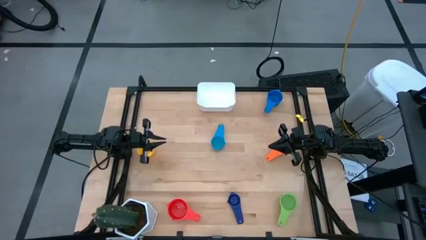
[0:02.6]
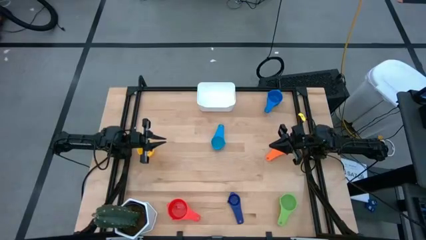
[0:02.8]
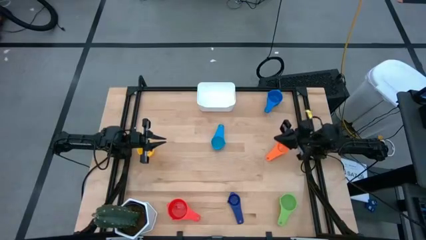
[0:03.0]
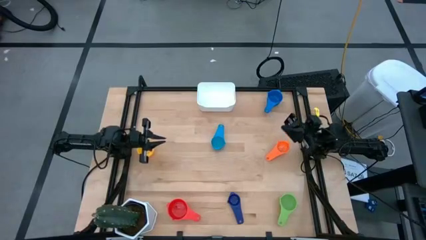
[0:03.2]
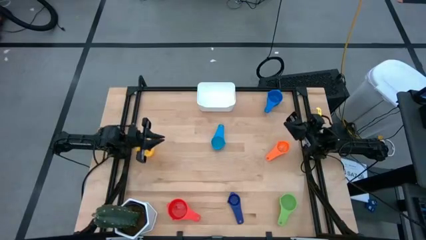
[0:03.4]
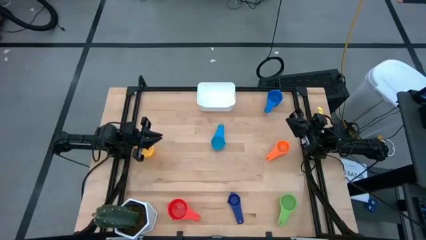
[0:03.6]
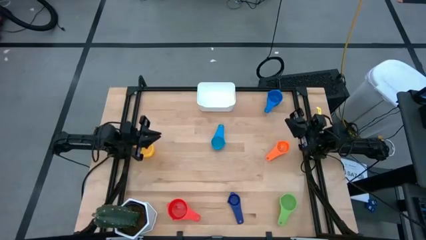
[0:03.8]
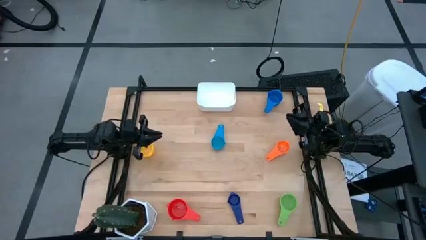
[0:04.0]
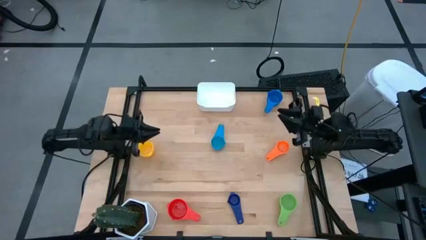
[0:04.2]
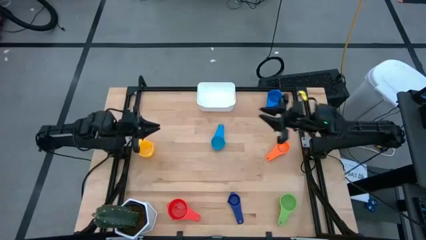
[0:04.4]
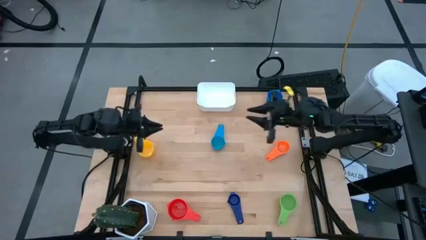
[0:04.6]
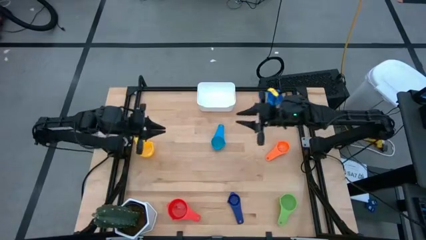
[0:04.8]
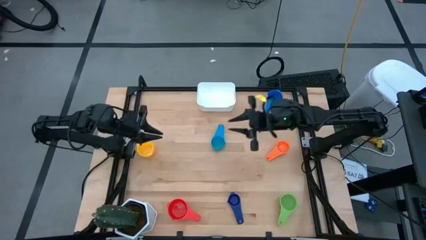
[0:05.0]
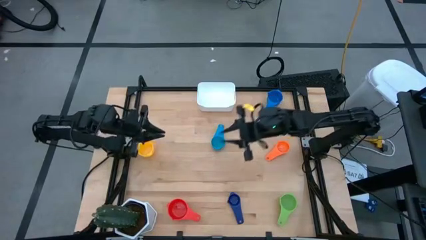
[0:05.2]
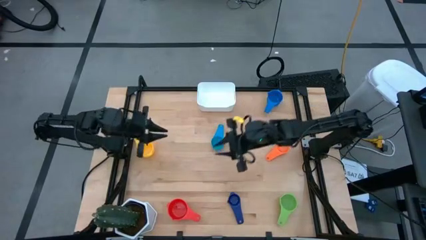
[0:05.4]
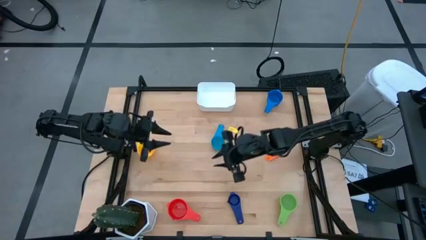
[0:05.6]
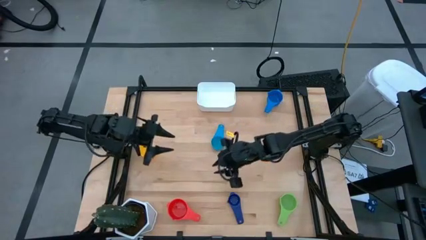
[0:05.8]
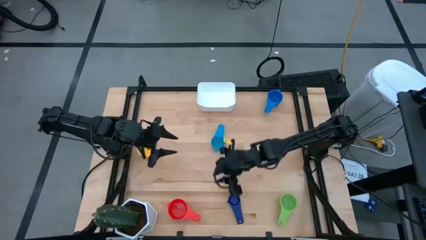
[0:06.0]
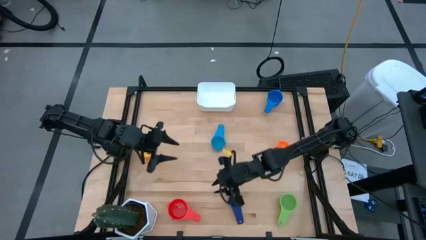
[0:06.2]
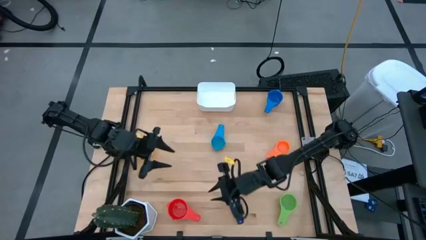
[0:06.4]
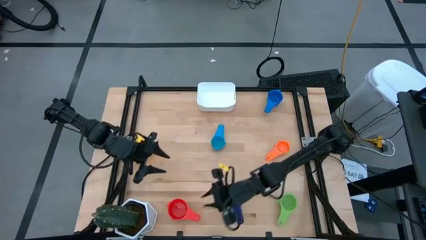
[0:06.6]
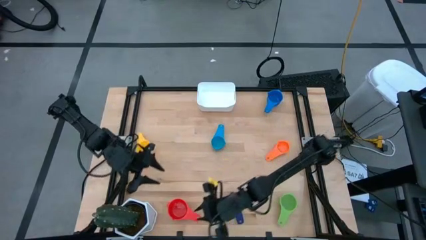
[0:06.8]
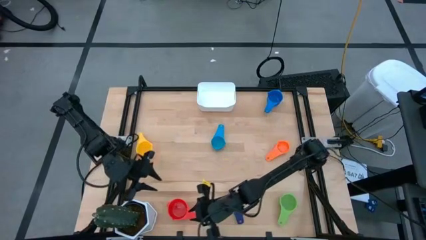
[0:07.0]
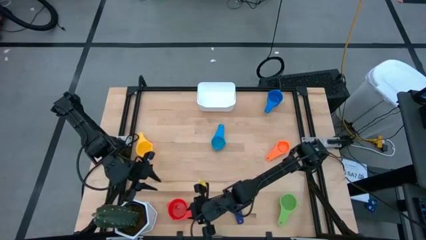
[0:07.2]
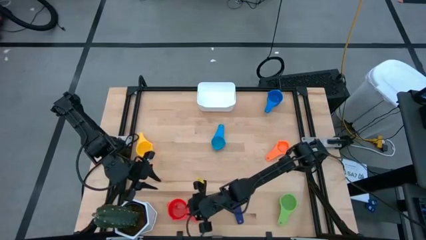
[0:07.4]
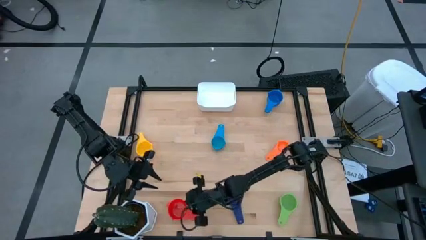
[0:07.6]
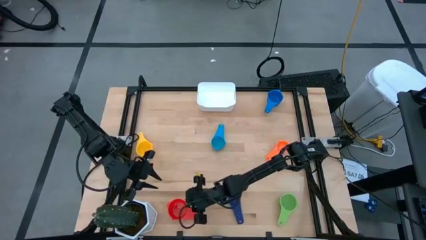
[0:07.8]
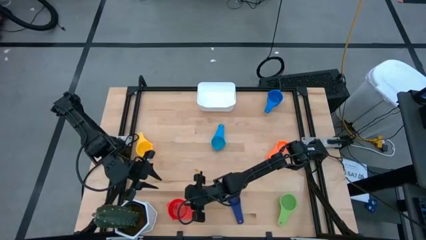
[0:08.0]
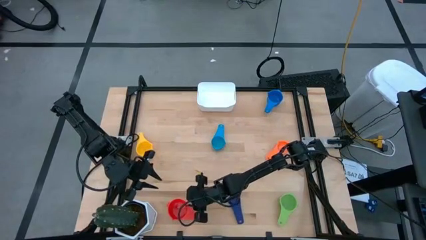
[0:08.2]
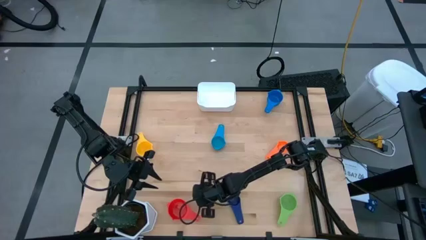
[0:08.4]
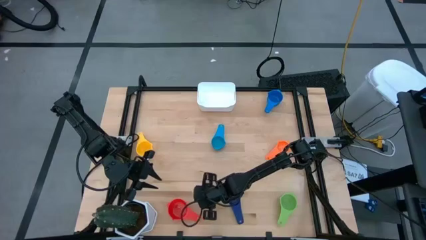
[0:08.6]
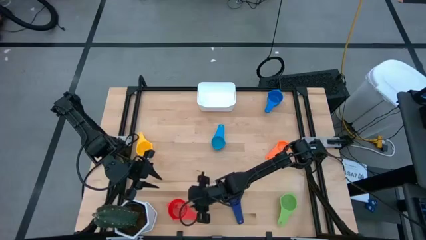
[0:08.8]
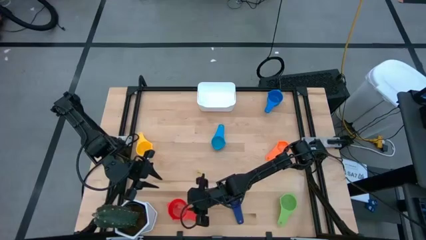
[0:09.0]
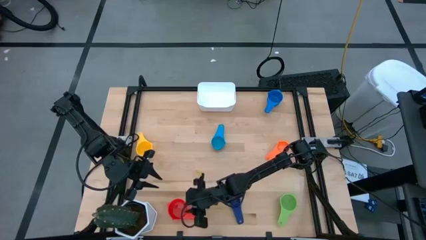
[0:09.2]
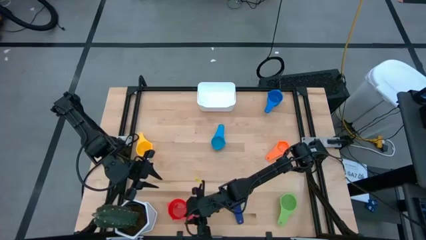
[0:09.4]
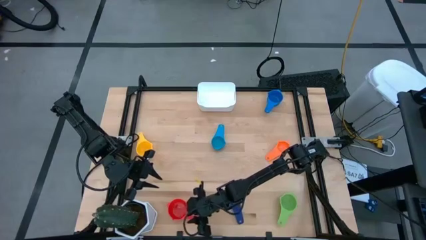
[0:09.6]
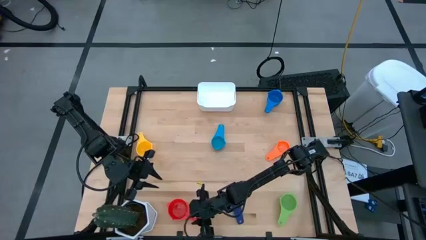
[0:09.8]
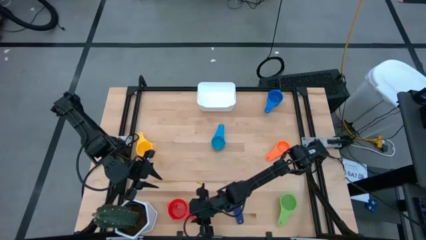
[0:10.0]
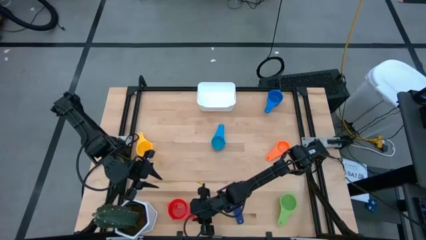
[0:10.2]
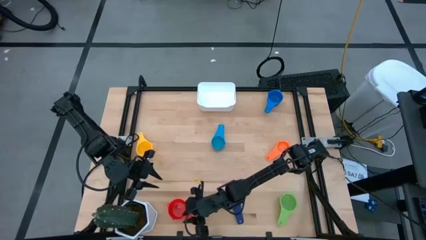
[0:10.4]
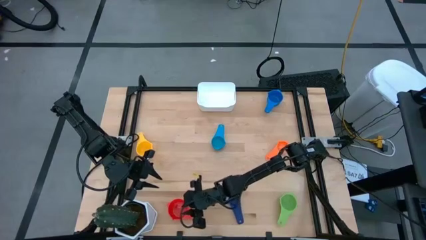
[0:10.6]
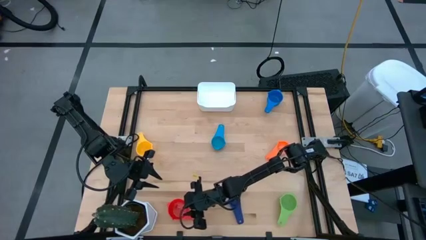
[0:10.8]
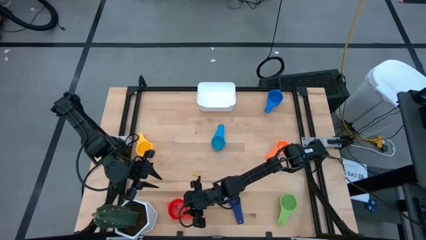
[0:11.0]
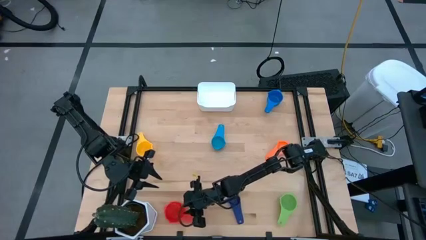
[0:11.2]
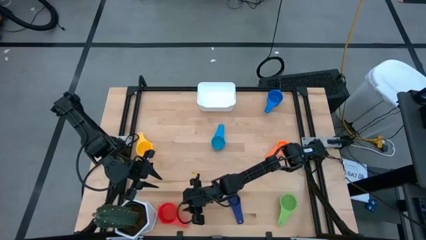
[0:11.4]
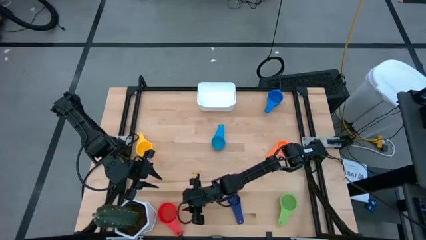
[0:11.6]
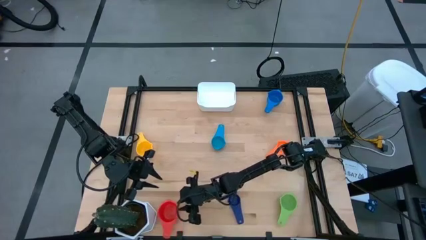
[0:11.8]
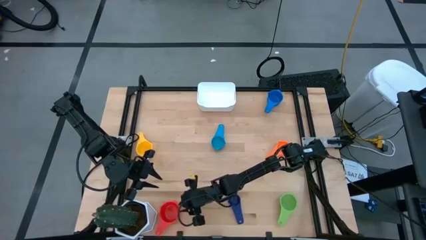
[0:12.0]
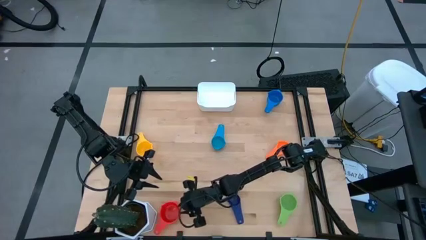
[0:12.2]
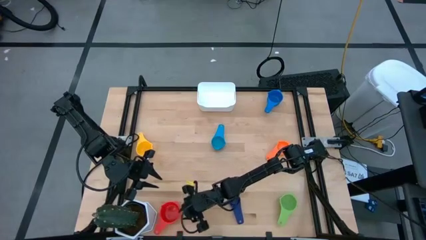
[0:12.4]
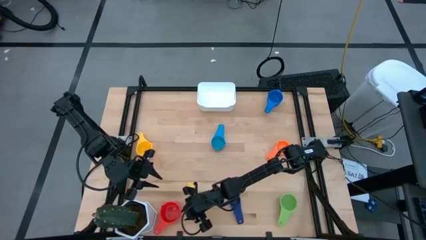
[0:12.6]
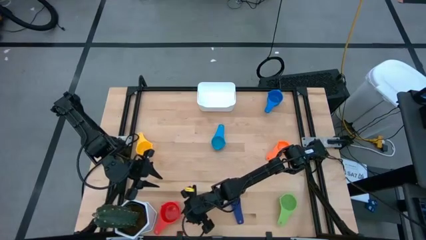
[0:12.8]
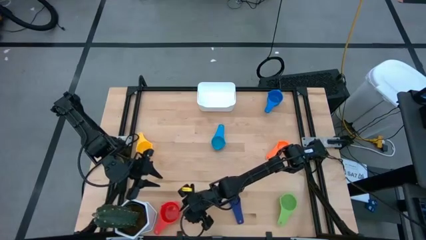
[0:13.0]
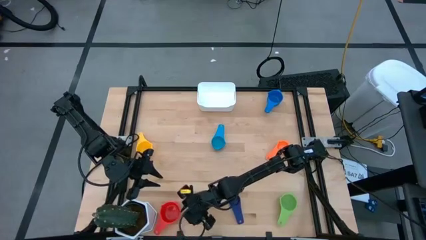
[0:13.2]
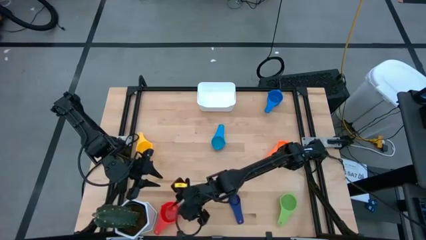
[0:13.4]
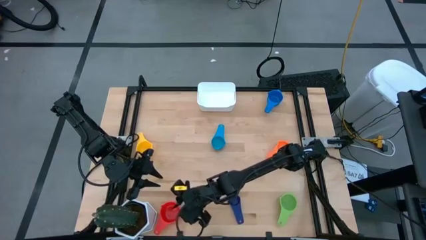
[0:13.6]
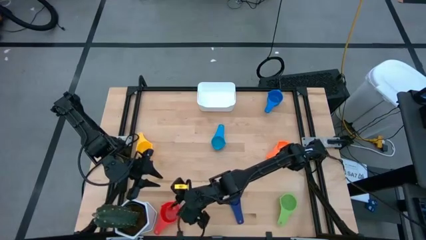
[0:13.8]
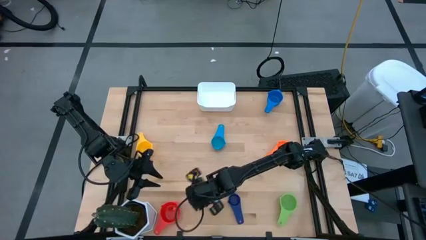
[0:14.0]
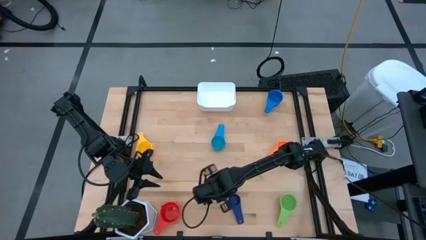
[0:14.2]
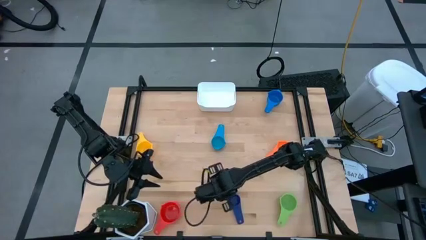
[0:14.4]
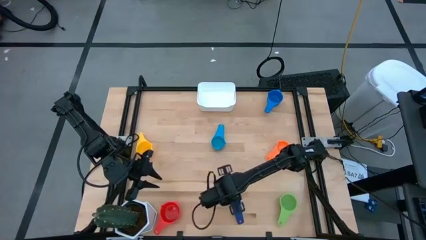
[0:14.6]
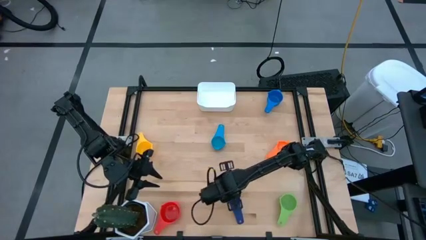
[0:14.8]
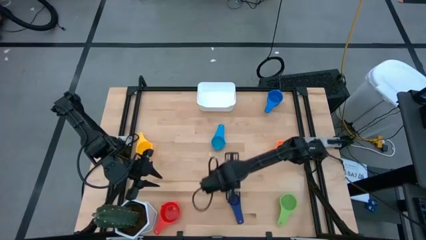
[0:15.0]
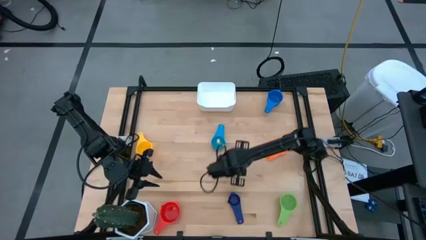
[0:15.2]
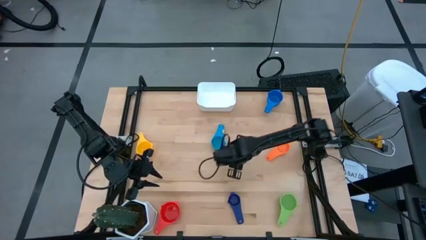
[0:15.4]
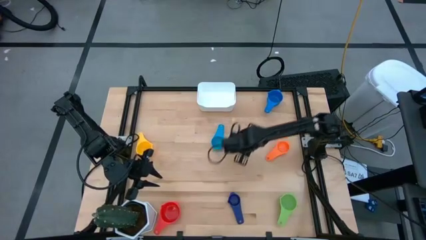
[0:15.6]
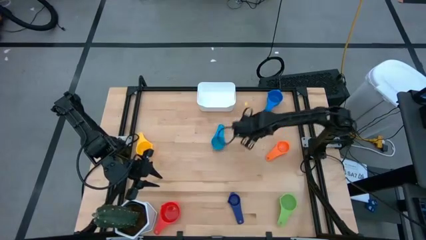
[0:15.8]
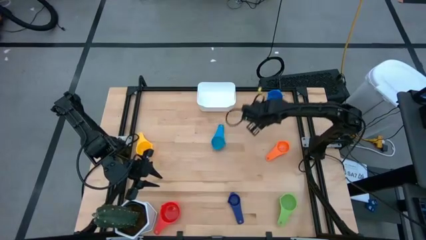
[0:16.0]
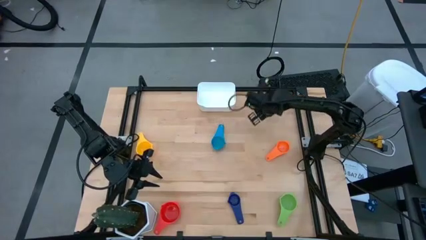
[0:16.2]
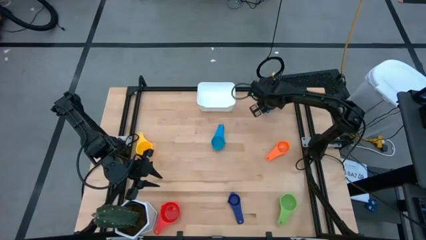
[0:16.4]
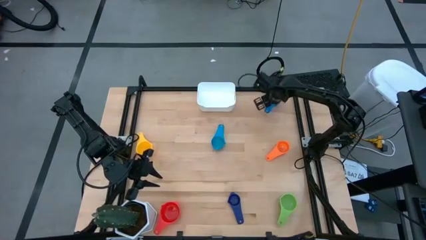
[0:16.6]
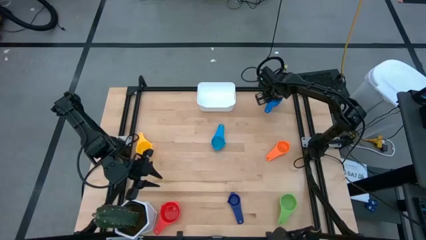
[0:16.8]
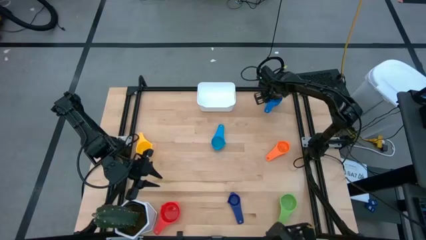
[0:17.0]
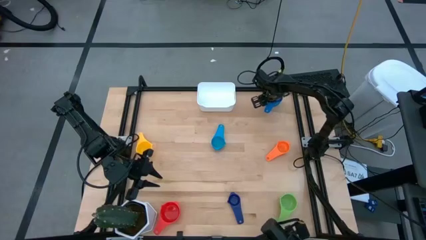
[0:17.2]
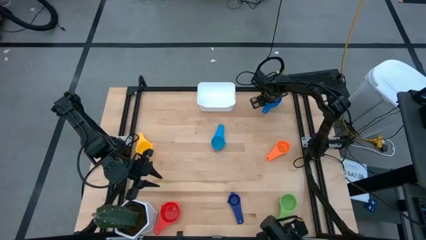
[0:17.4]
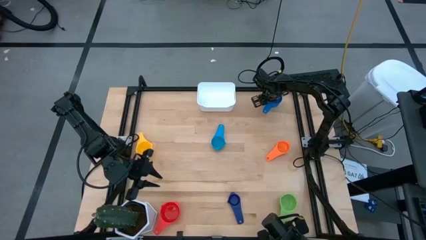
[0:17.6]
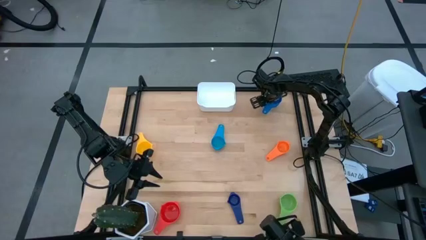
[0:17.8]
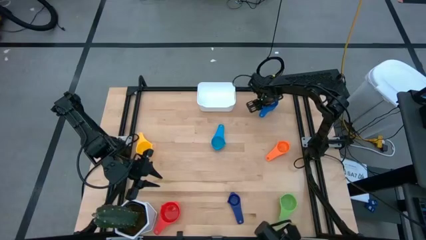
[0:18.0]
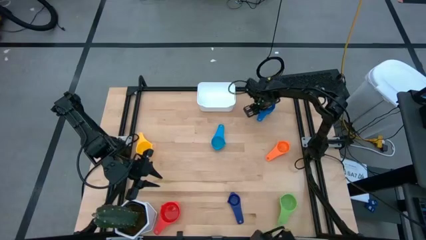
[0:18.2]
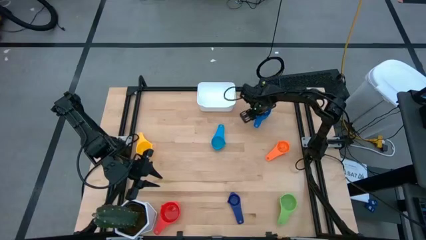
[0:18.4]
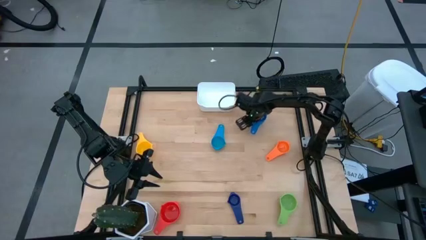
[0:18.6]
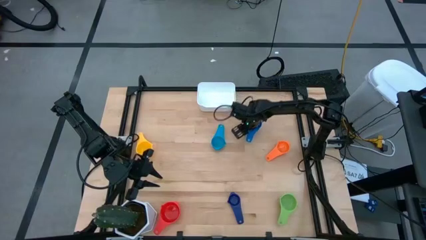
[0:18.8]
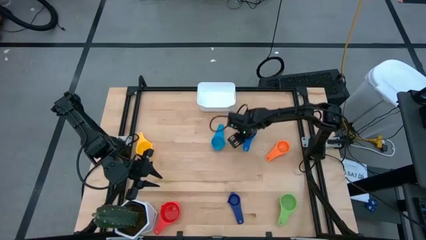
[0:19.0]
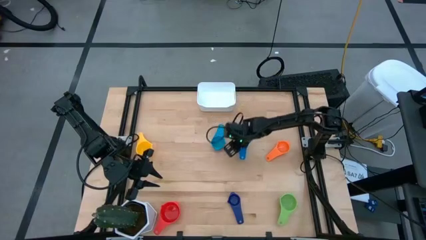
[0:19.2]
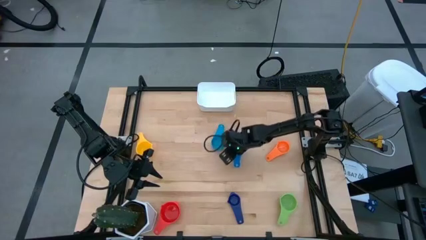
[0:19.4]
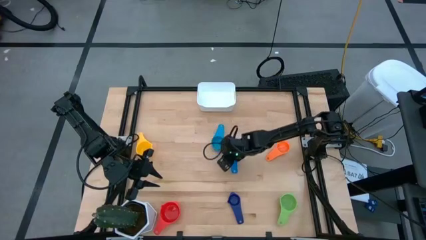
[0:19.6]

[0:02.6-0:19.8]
Task: Nest measuring cups in basket
Move the blue measuring cup to the center of the table
